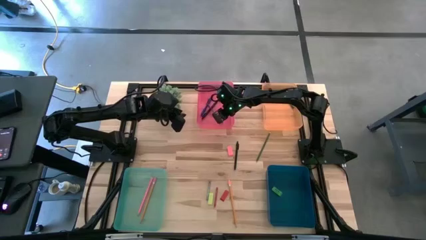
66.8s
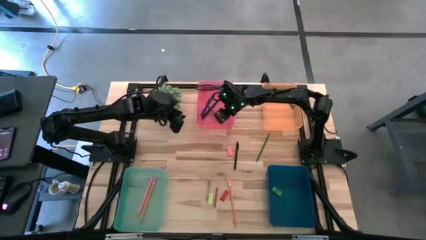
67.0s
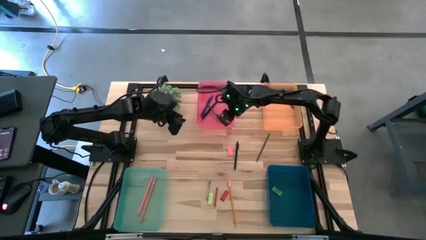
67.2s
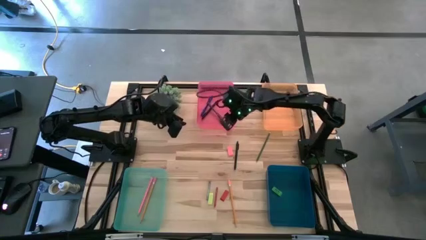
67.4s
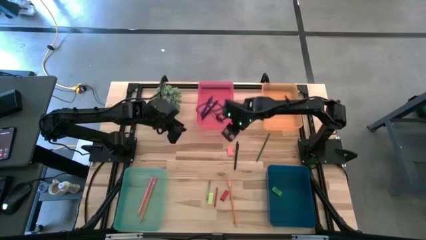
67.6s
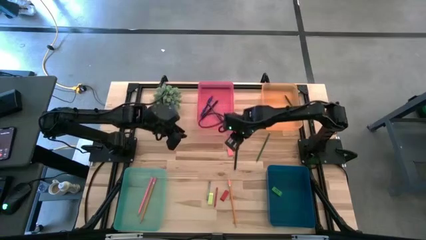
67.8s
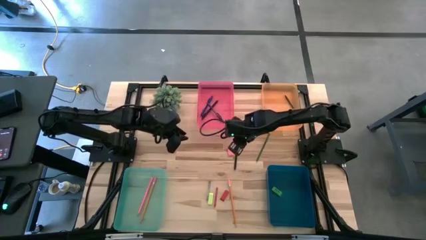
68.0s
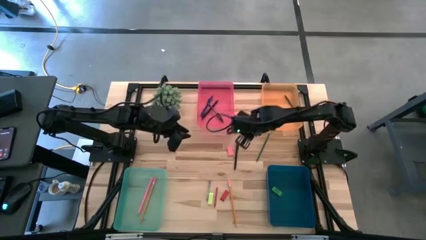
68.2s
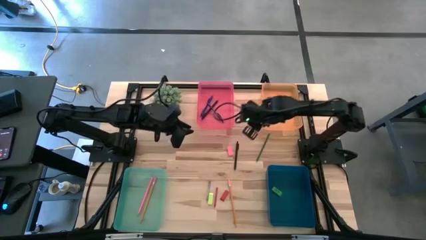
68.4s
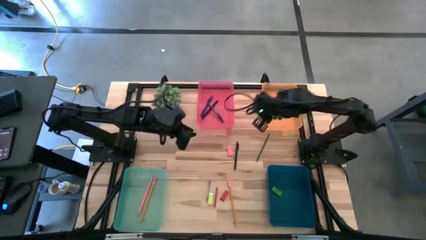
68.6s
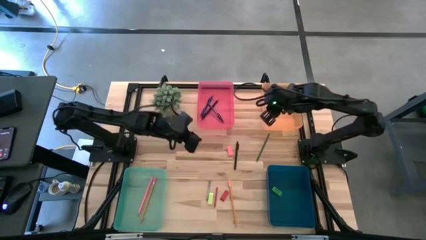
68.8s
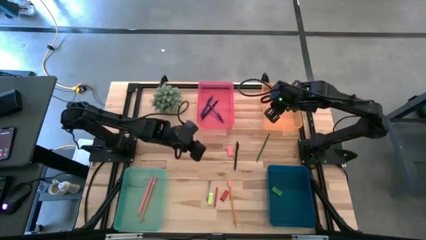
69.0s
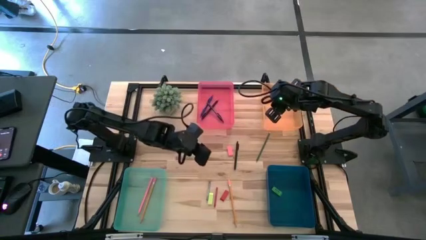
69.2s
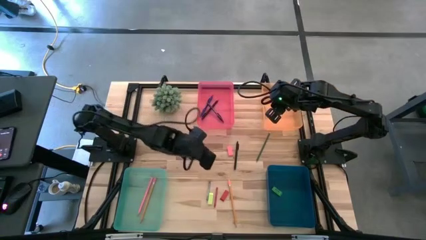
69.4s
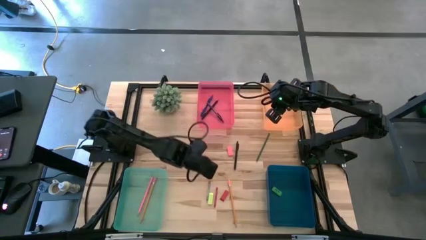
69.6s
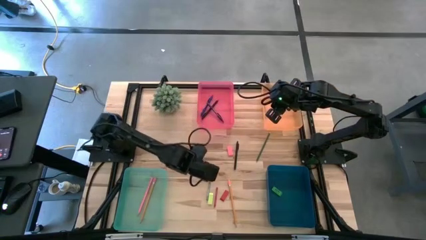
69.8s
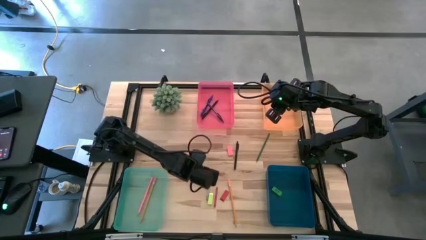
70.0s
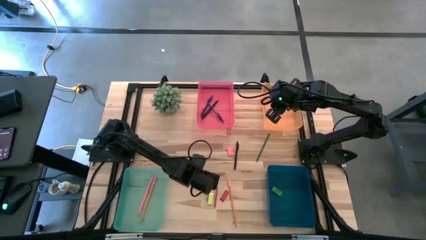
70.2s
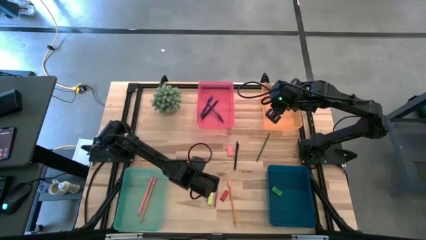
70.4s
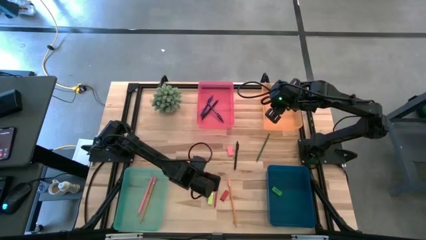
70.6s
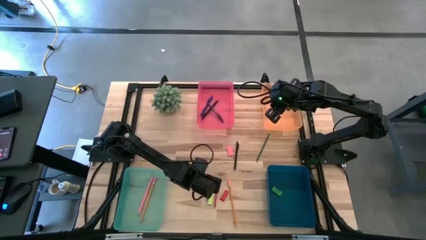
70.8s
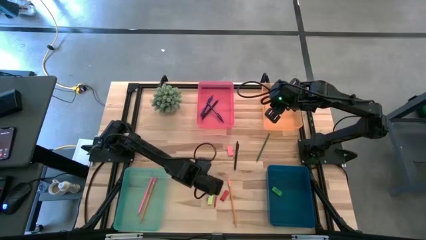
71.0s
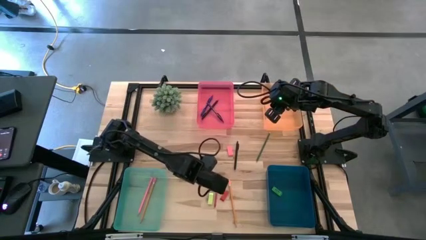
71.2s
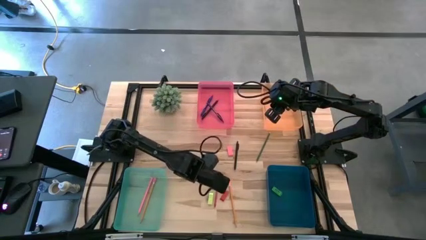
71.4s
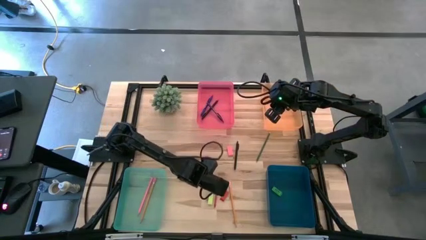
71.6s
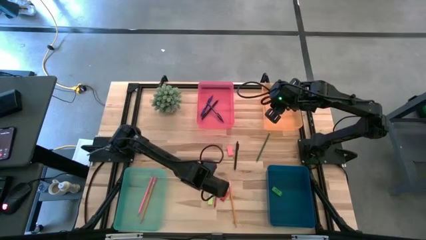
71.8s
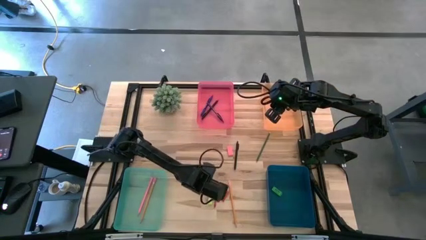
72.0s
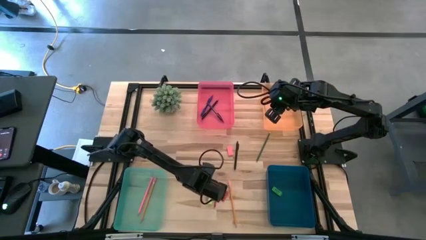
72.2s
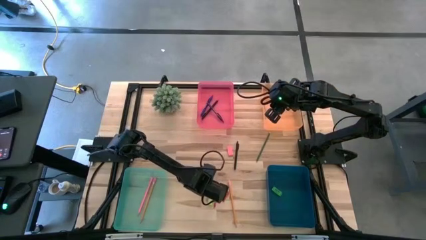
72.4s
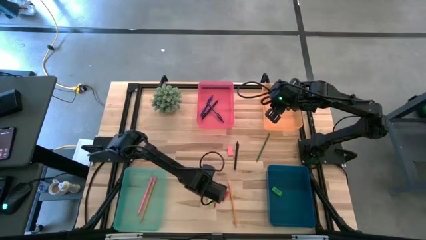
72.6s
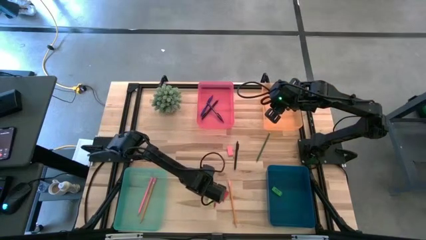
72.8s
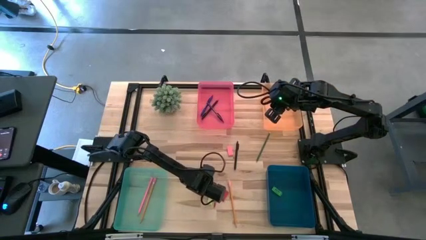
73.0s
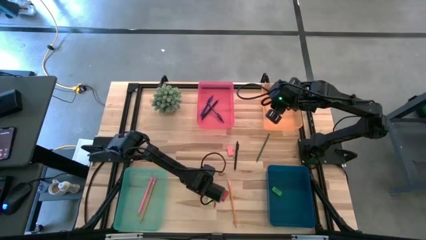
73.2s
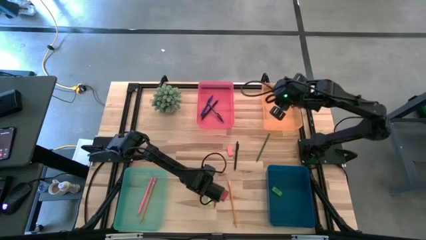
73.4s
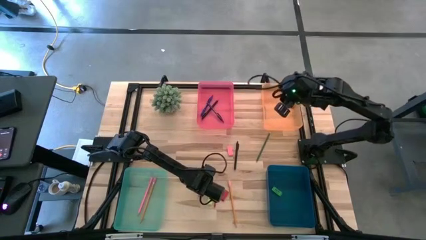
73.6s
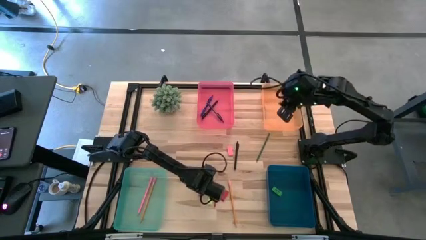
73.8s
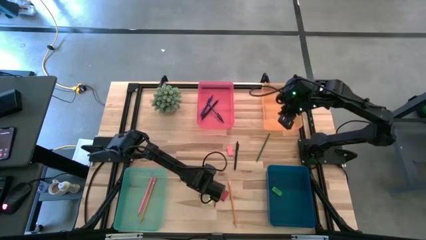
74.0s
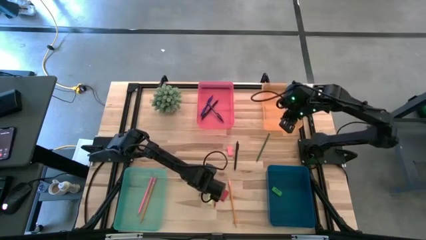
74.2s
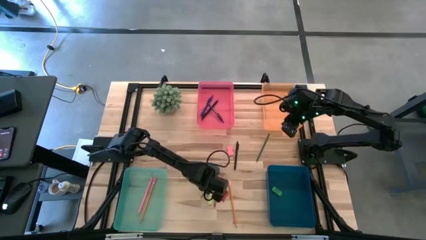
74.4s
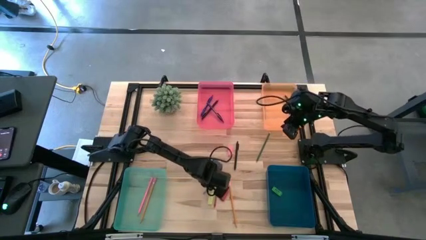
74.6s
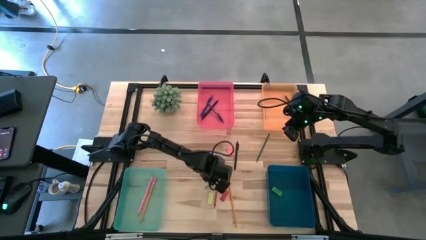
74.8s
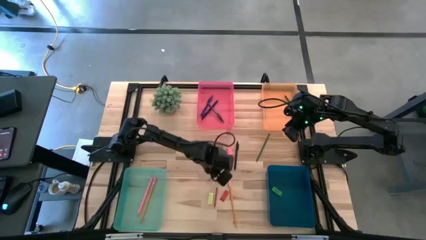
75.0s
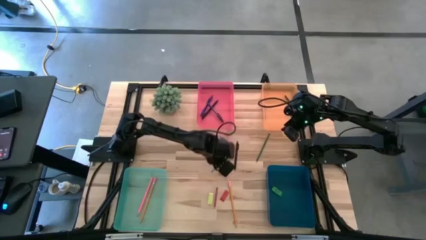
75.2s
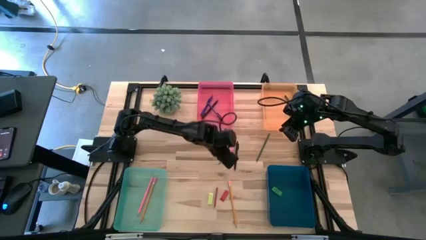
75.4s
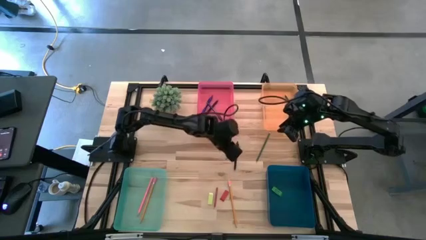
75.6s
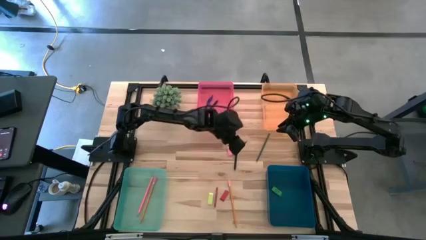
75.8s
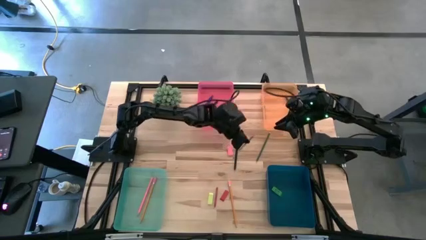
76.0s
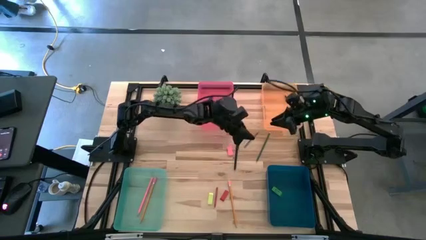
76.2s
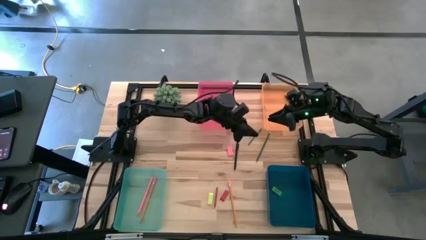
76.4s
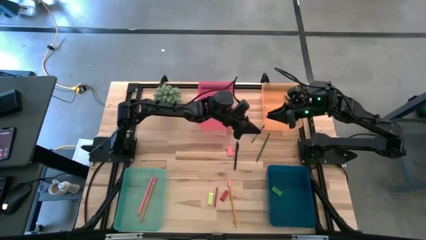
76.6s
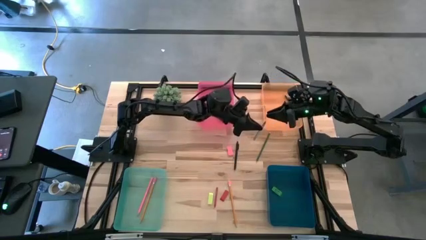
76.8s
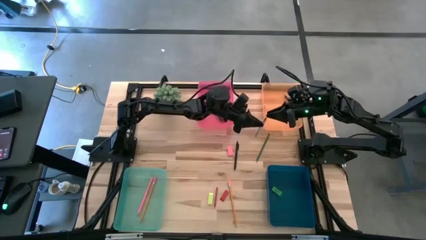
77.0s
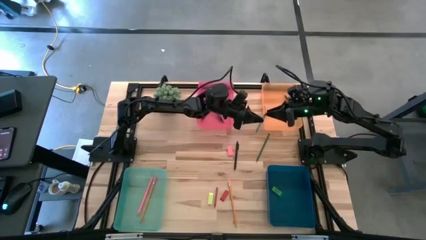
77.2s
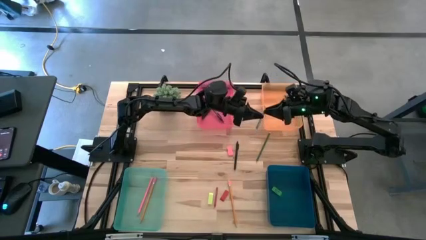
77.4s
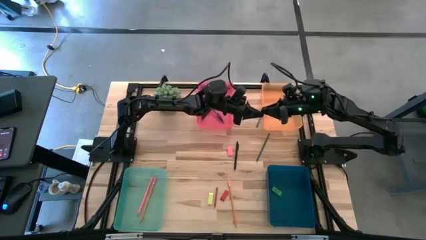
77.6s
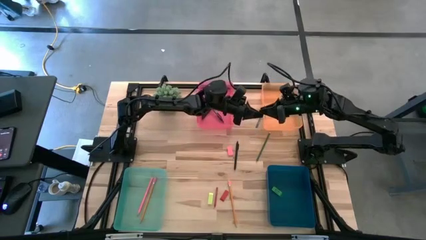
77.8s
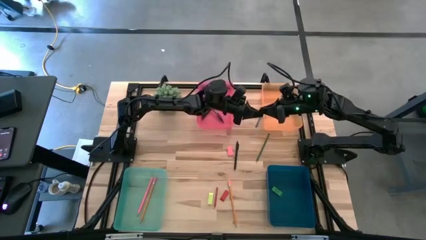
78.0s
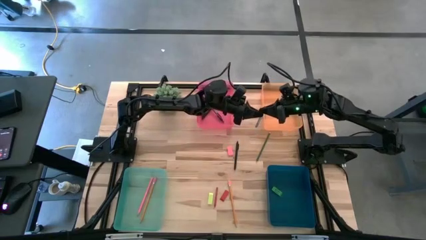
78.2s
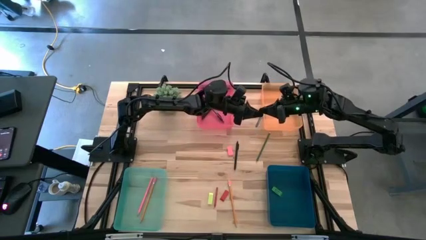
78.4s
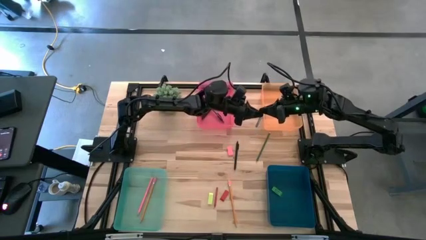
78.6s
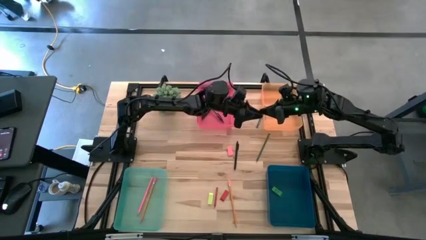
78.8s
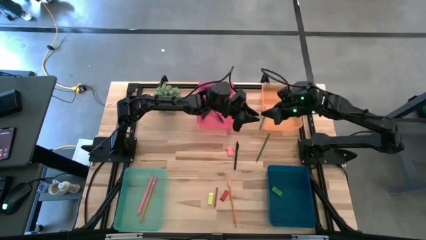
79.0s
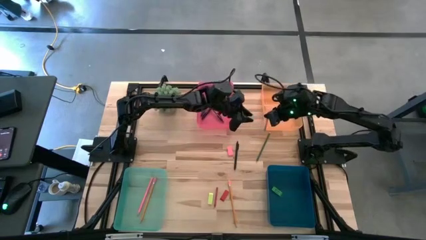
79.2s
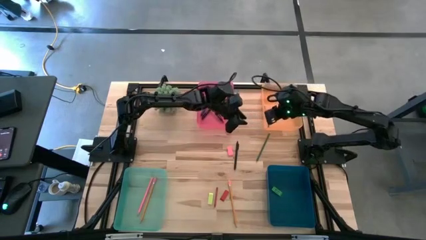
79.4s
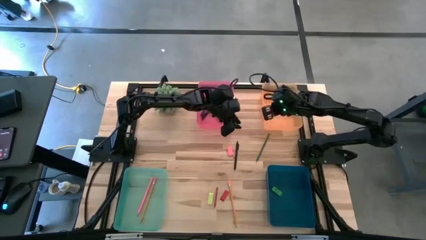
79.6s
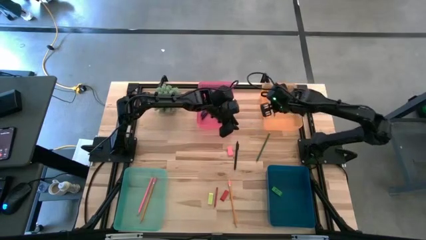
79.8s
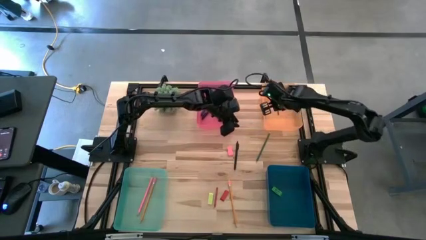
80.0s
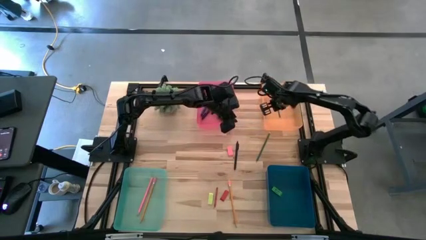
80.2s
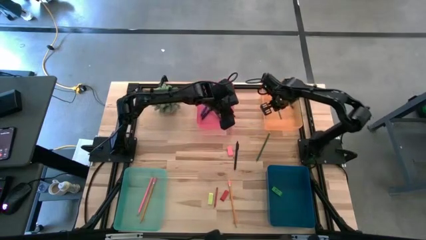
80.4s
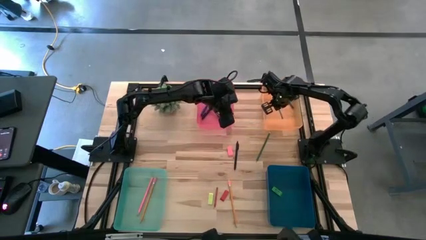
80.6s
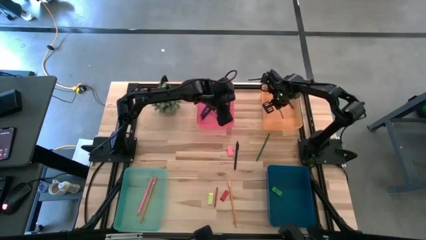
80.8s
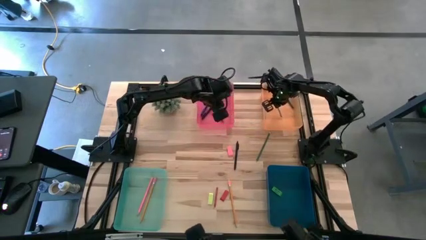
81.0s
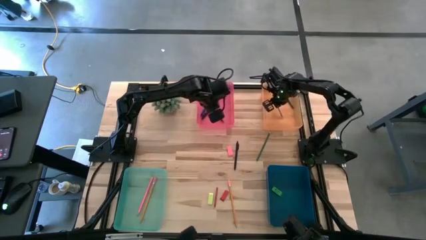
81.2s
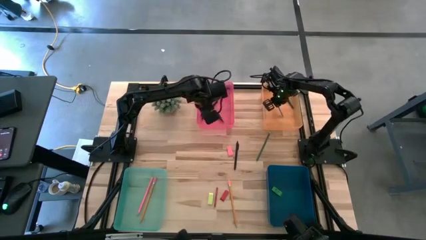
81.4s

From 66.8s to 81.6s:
Task: Sort crayons/erasers/pens/pencils in bins
Put the gray crayon into the orange bin
